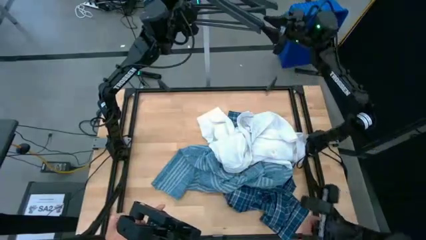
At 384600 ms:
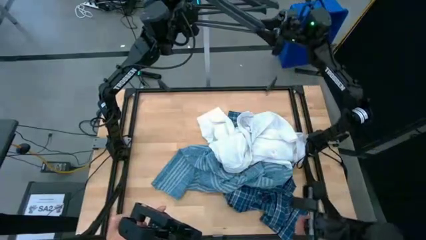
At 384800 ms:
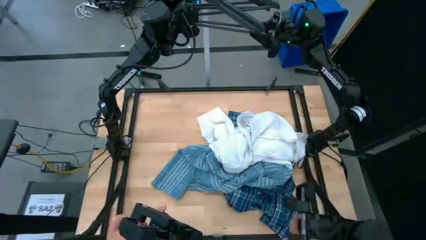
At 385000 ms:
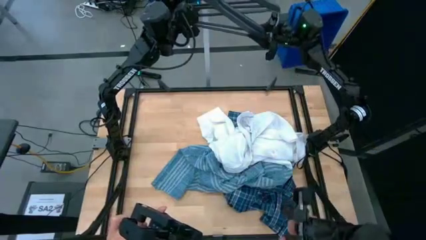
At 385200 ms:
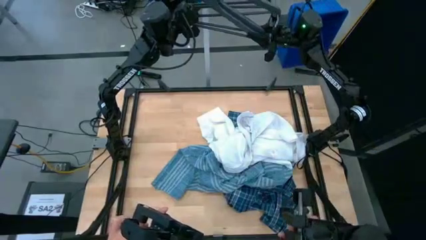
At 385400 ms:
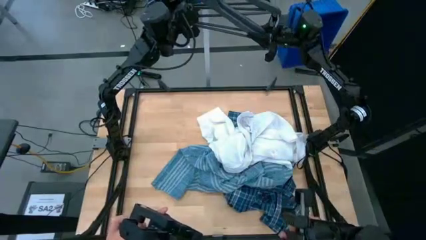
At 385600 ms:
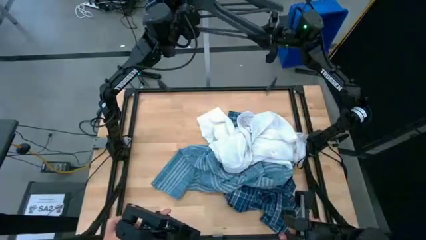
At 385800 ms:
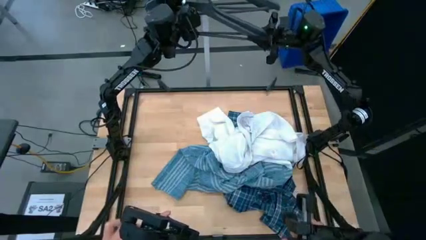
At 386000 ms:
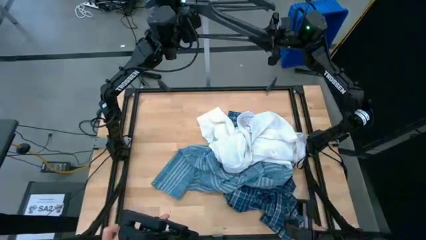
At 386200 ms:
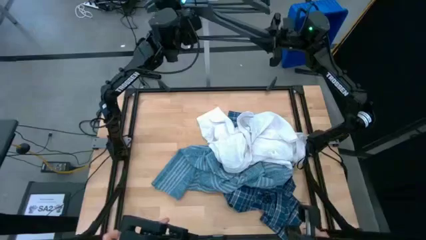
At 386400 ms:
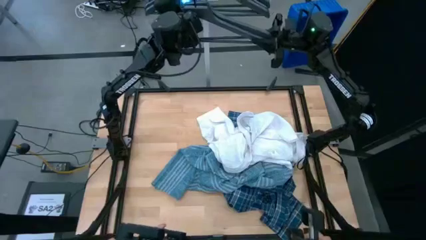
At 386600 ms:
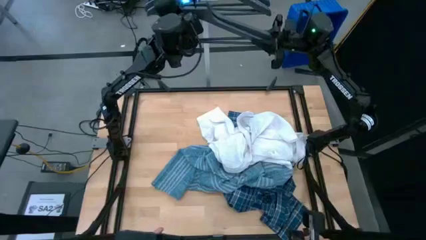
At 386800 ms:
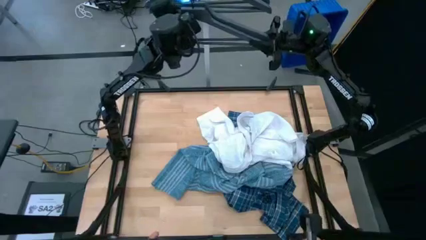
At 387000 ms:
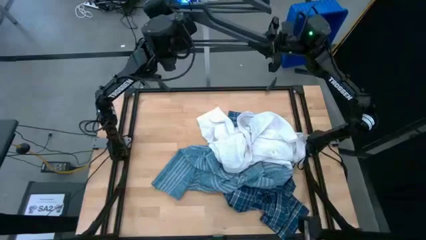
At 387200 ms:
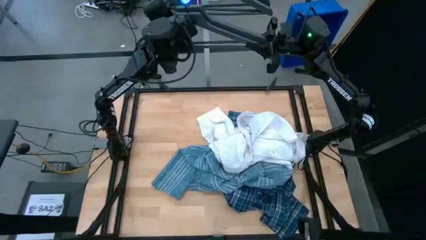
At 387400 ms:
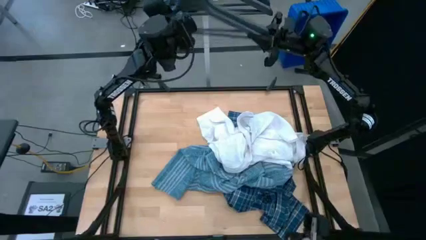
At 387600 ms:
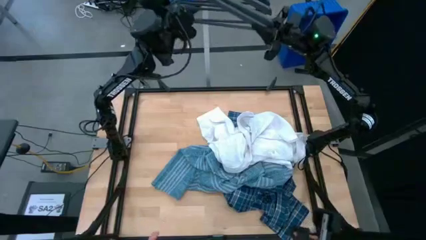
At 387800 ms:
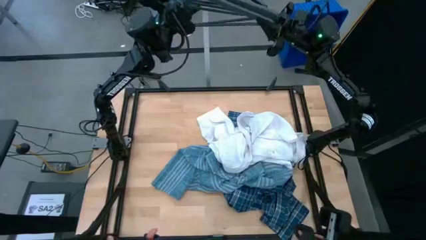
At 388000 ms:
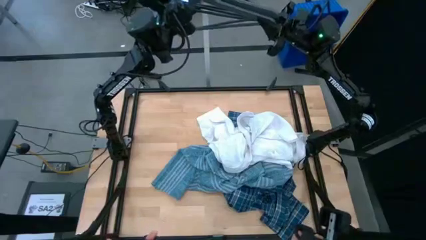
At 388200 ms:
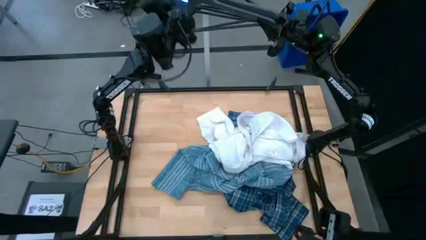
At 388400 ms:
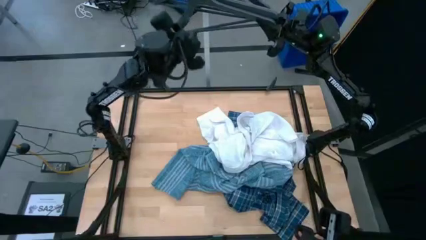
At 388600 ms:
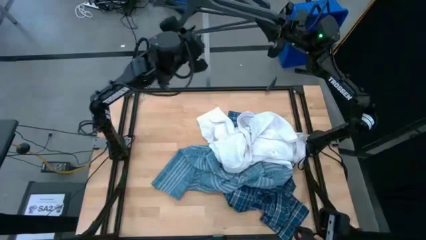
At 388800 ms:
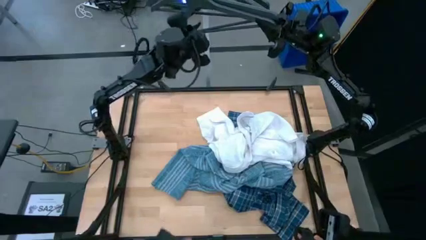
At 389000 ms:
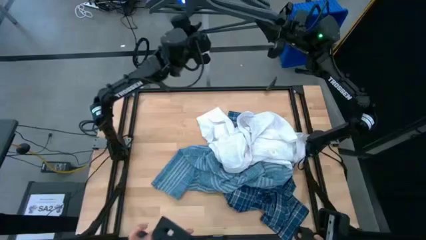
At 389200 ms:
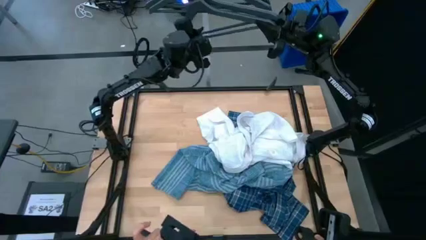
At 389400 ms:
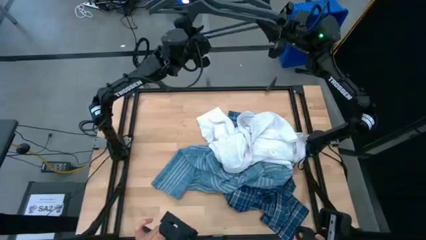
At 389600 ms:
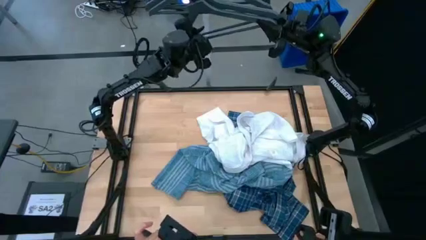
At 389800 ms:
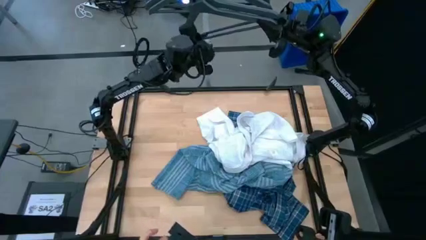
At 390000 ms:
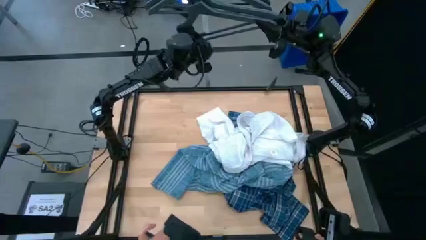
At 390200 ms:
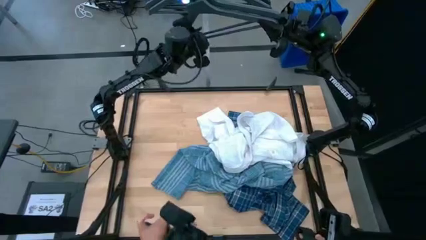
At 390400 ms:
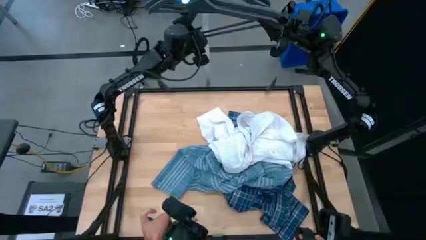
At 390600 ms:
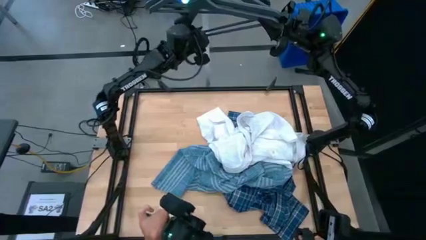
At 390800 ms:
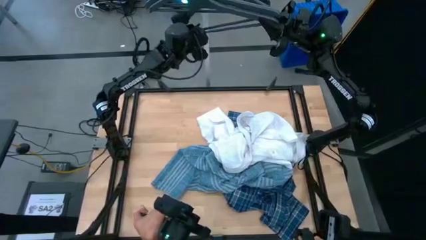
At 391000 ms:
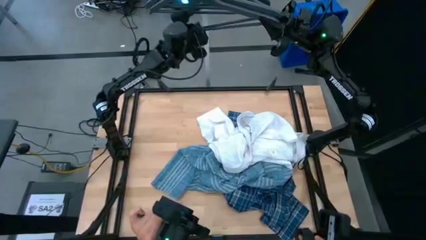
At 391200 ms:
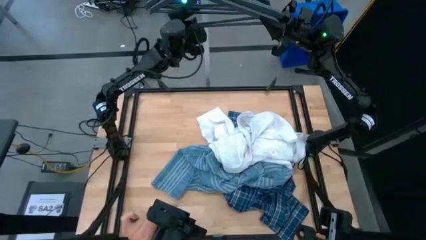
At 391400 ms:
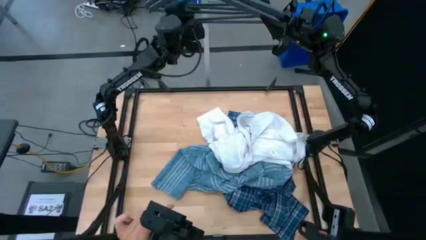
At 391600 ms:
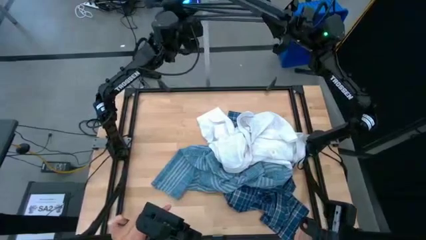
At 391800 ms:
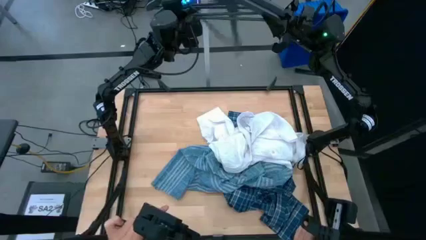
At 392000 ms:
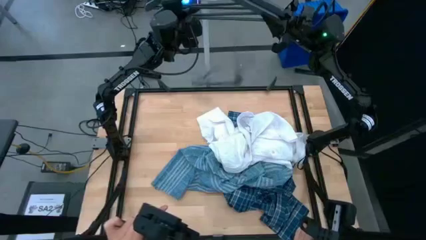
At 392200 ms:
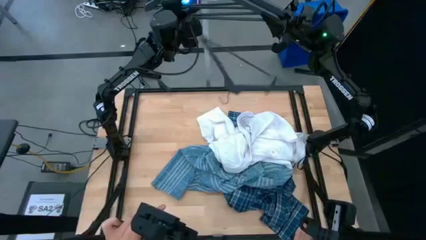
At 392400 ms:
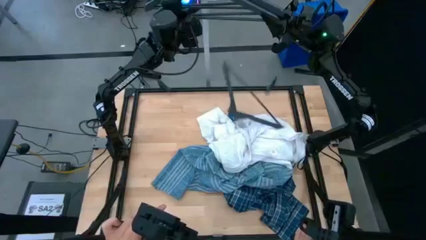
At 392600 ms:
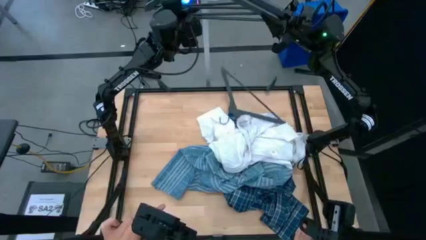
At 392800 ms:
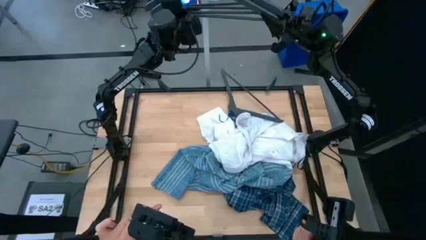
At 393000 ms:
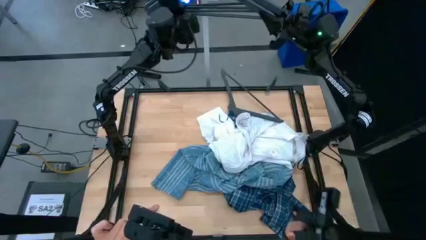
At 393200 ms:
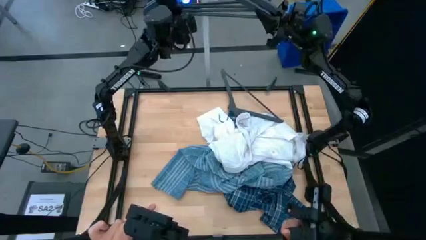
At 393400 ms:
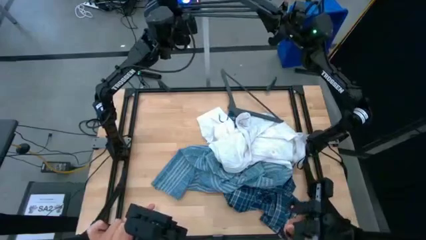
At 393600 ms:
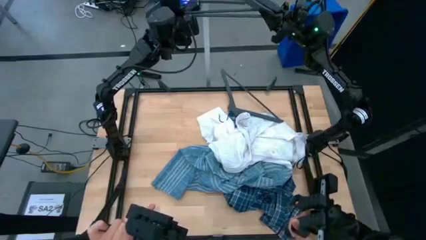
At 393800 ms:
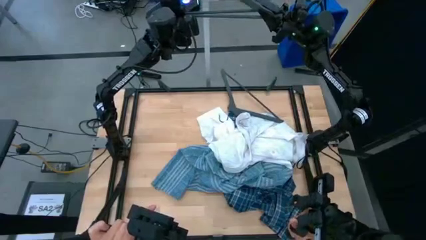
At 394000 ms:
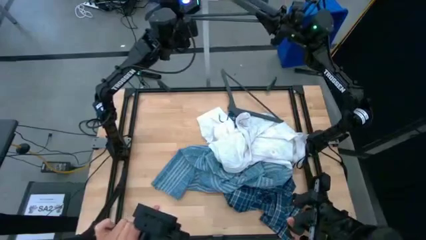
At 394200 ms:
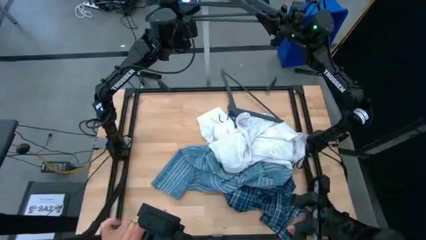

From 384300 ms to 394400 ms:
Task: Hang clothes
Hang the black hangers on the hanging rack

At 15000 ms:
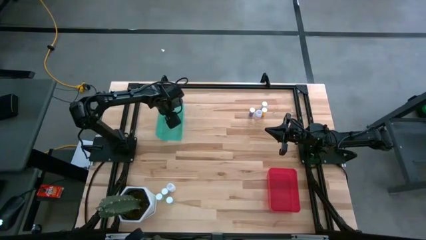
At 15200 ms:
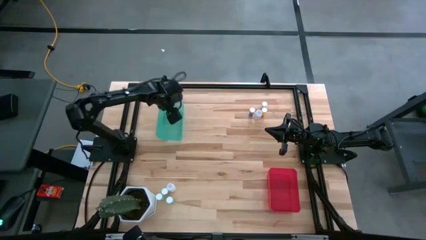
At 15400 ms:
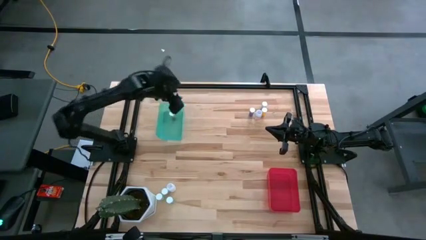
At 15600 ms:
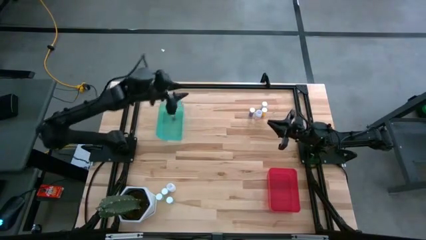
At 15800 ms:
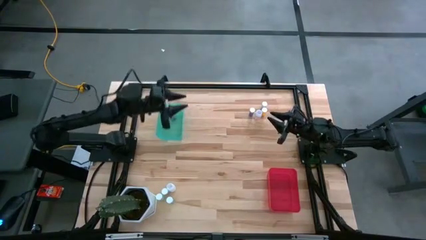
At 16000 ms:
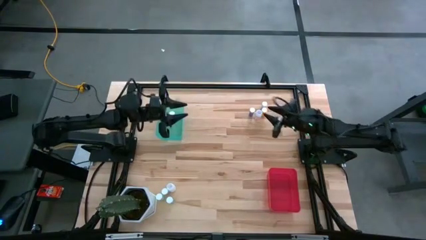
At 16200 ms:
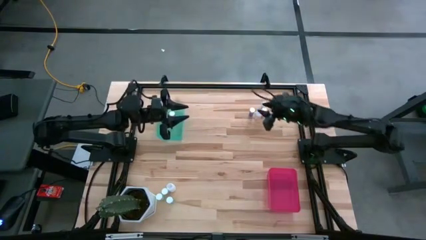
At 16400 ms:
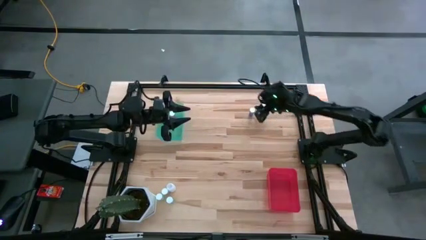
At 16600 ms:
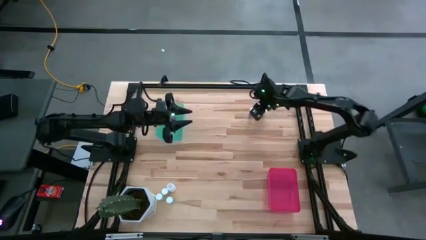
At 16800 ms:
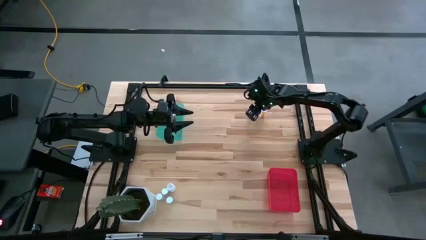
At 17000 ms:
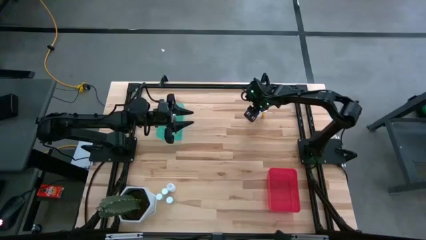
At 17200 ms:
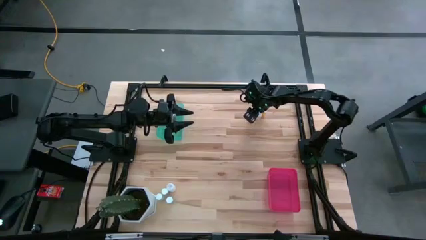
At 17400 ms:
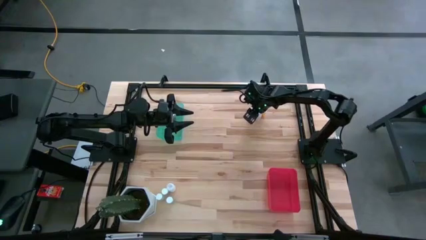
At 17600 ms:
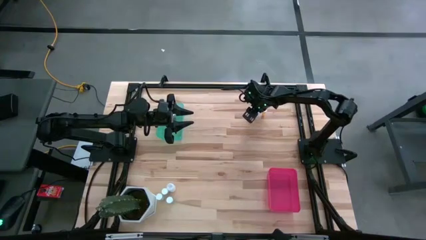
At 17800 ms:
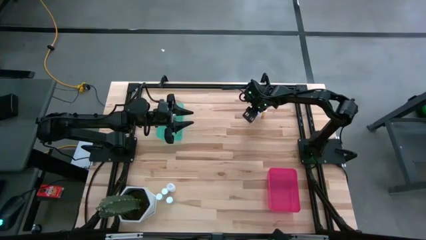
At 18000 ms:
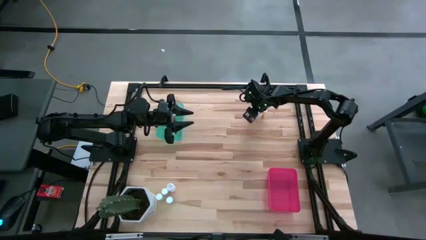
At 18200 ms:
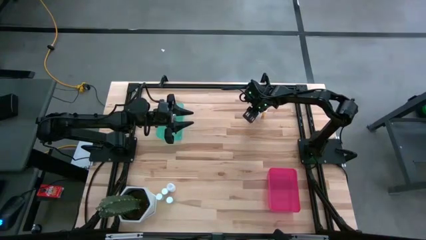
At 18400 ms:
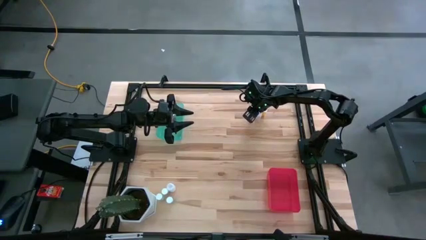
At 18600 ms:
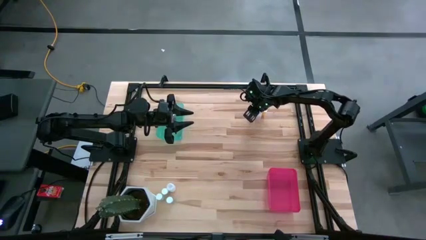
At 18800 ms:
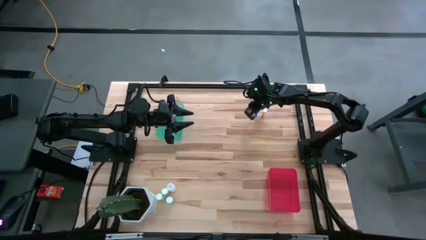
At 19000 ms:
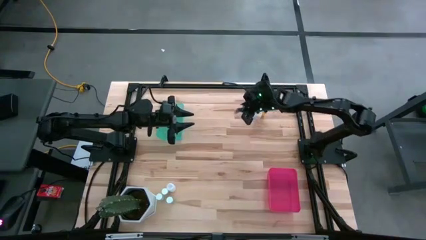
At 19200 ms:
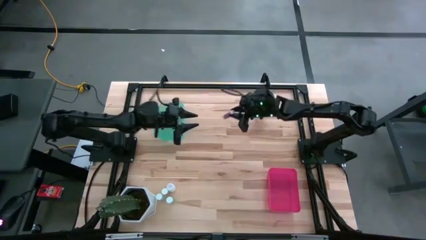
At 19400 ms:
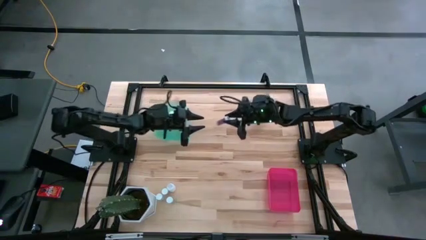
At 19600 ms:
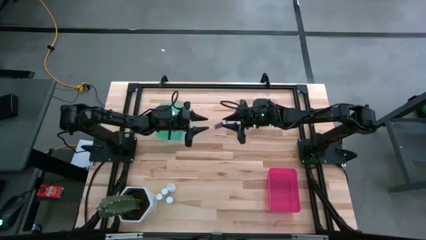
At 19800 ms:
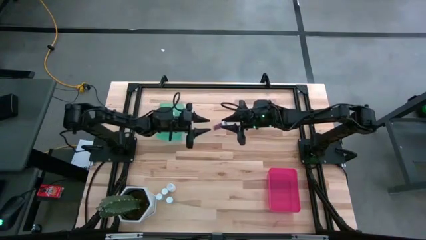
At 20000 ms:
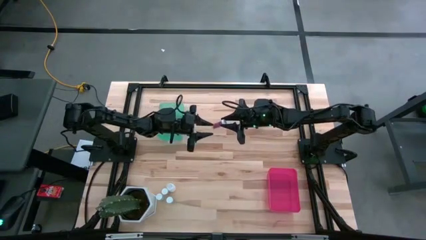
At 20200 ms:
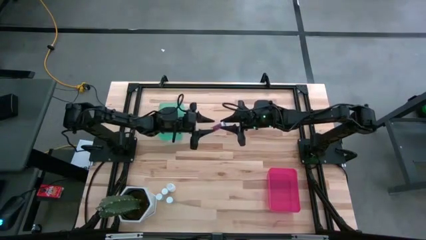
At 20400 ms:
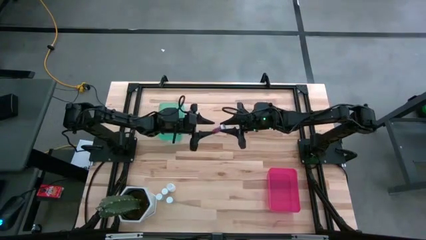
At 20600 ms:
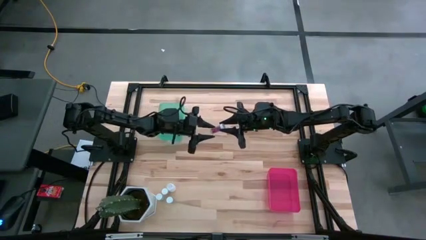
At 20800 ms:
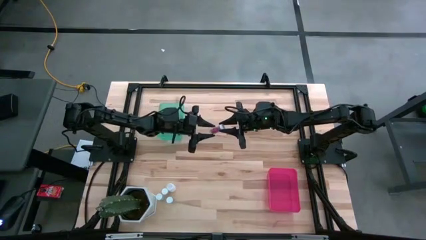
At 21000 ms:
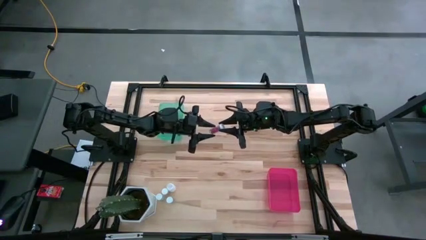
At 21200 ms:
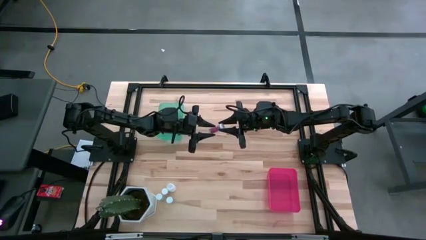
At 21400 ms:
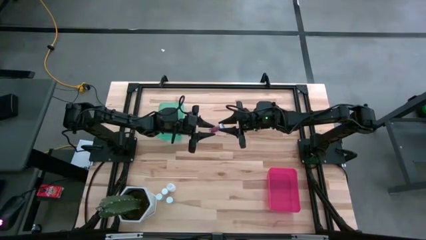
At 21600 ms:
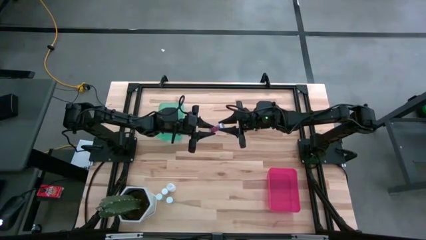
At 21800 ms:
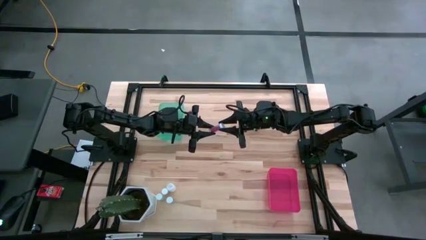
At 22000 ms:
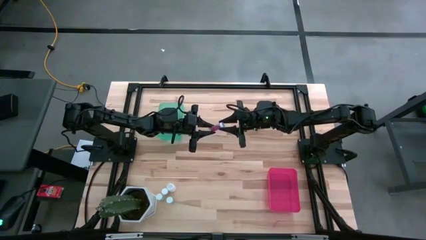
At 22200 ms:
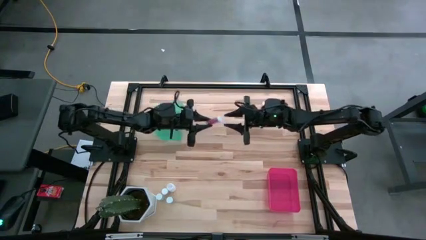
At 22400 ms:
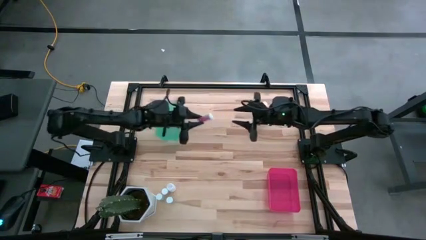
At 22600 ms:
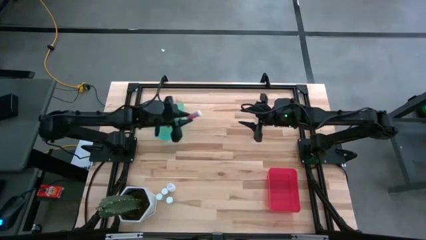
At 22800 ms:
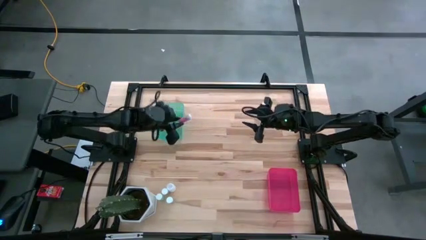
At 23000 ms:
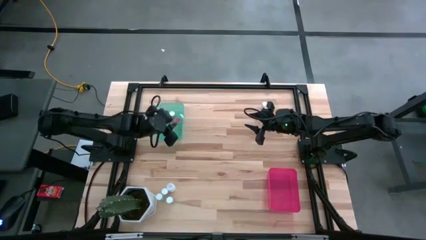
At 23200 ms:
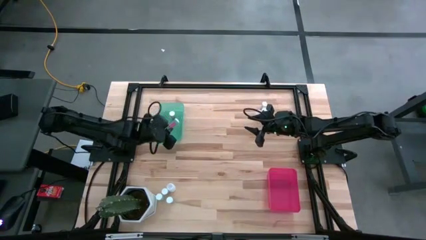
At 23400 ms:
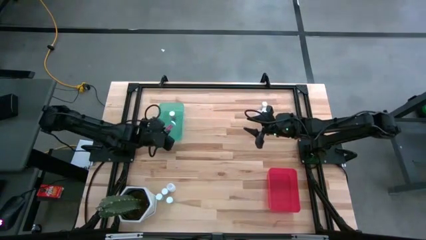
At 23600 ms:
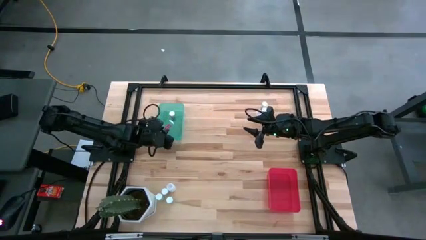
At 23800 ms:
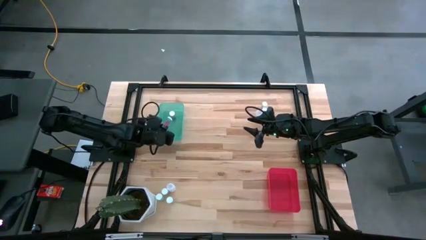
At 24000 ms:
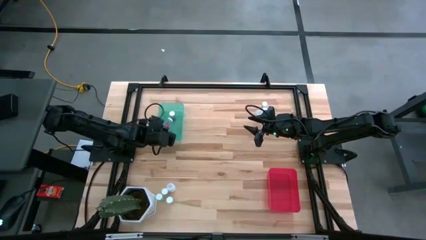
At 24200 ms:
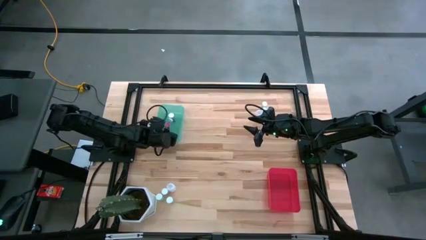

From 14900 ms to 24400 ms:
Task: Pick and place medicine bottles into bin by pill shape (circle, oval)
Put the top blue capsule bottle into the blue bin
